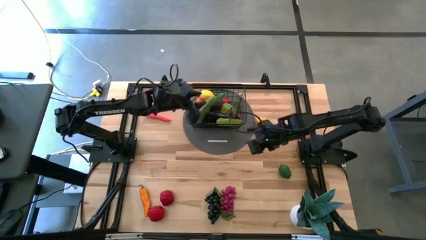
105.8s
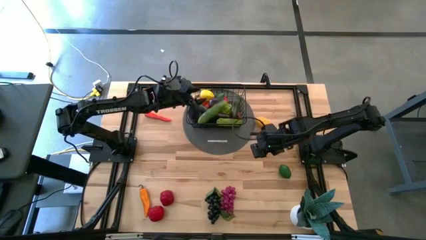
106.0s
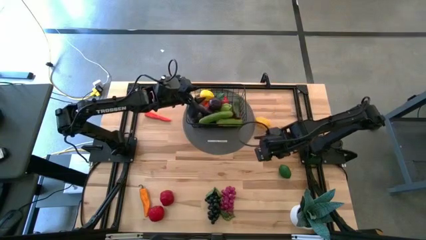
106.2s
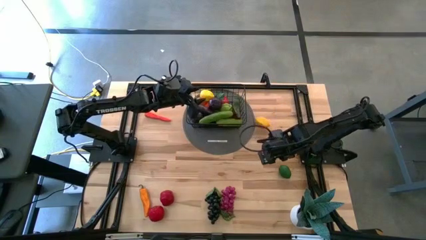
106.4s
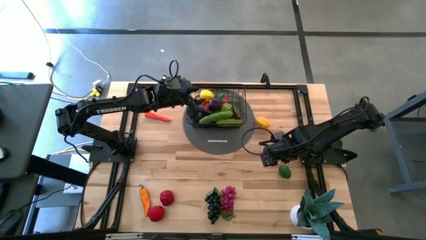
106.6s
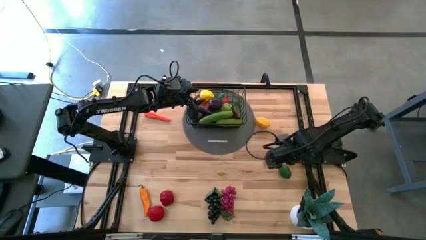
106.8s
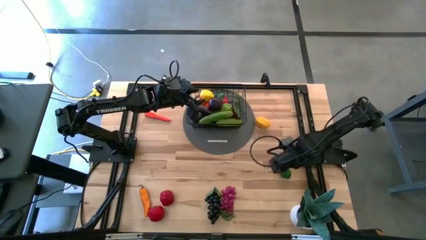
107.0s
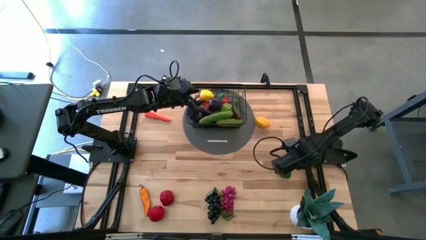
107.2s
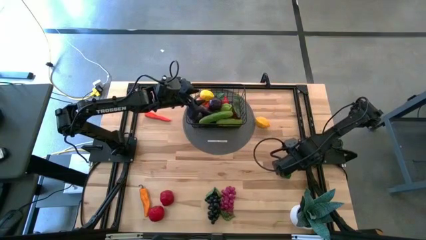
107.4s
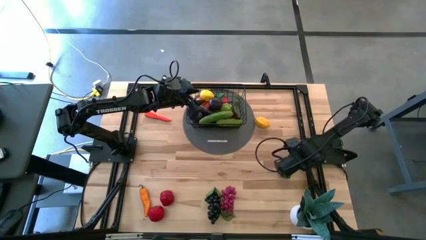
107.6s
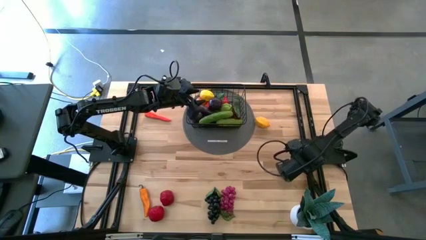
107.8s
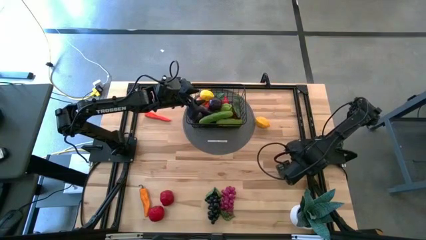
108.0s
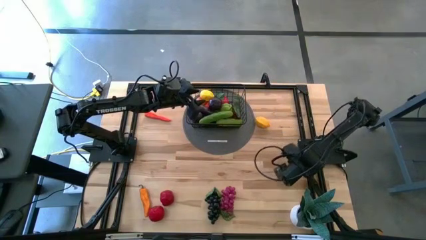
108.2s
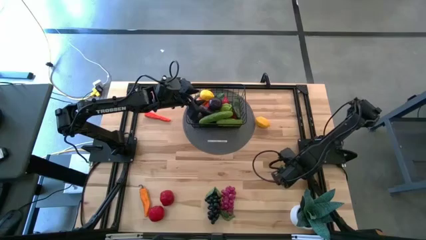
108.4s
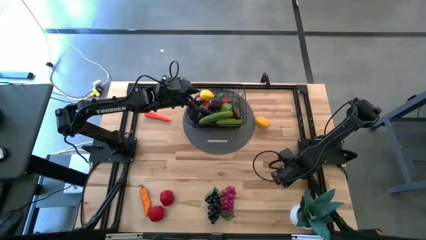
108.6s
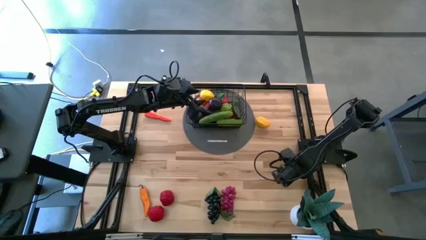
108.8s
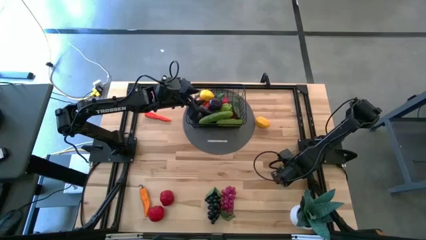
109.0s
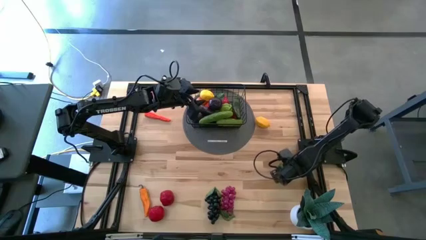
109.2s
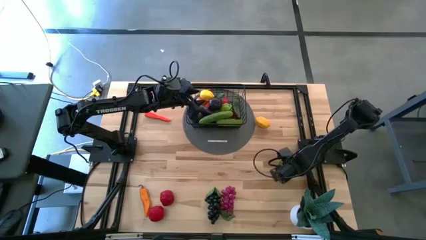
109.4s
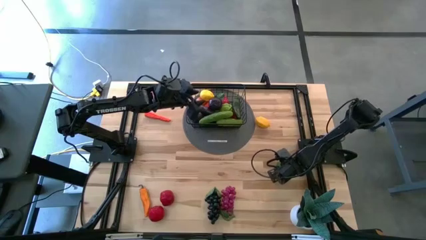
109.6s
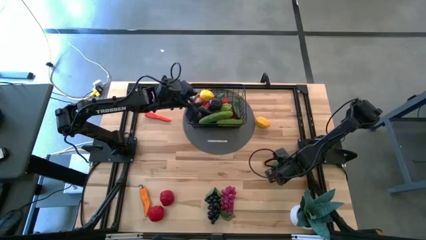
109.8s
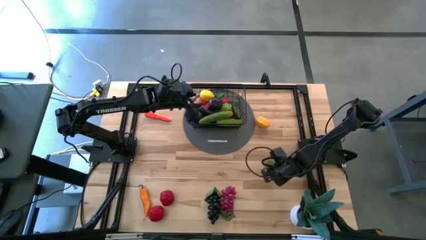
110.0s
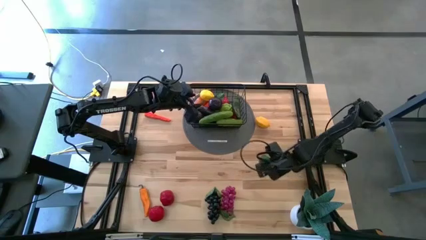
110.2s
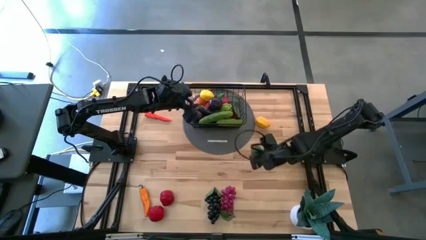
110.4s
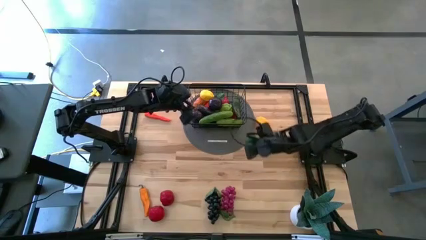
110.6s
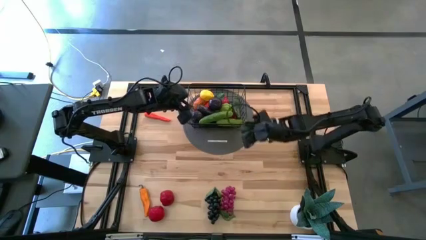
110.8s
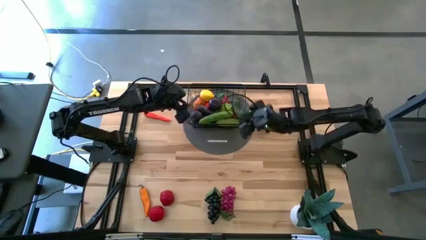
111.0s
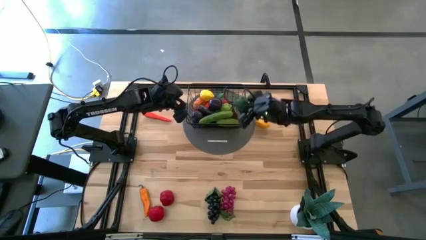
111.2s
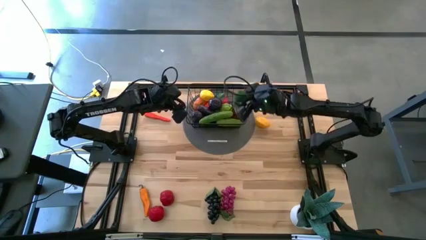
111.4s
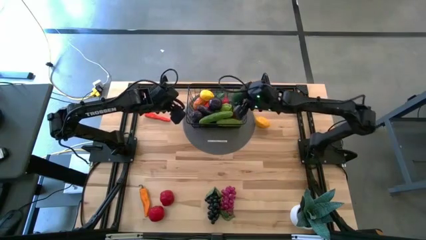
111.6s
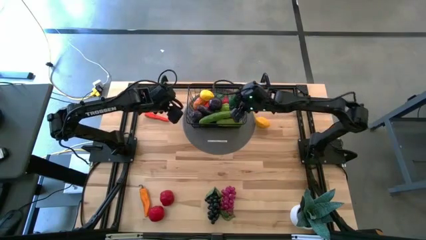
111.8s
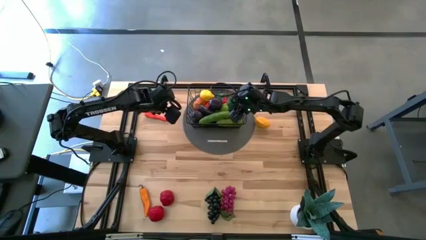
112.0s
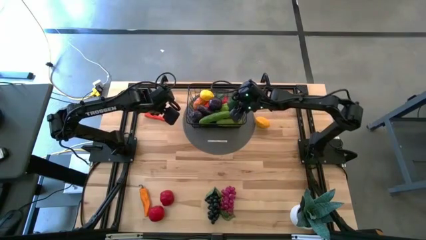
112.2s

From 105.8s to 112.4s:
Task: Build produce basket
Put the green lime into the black wire basket

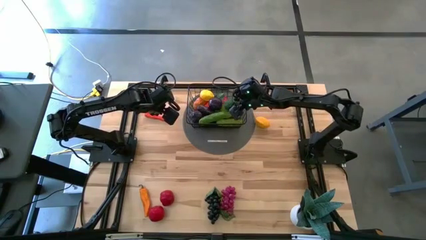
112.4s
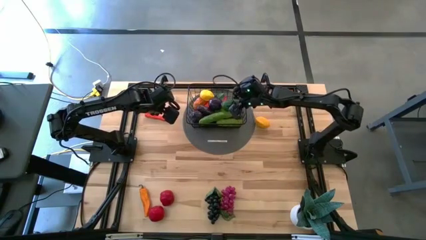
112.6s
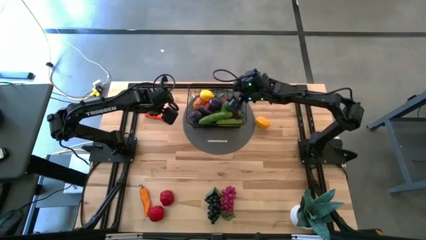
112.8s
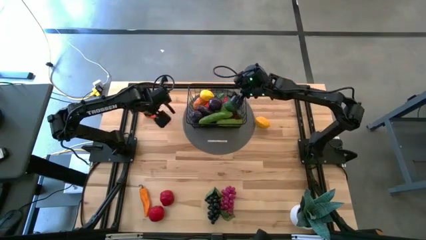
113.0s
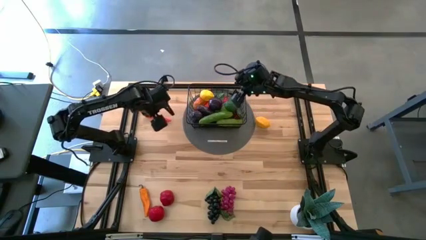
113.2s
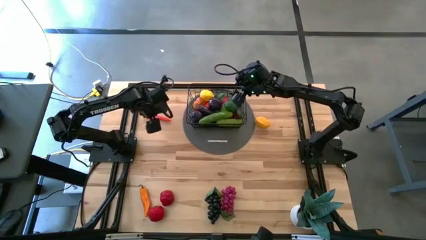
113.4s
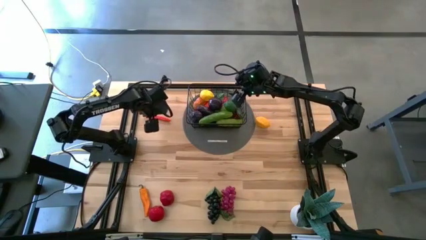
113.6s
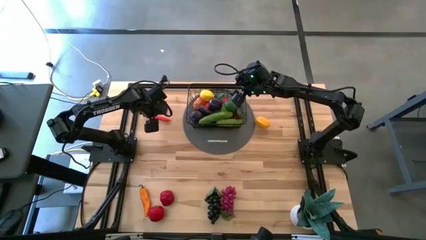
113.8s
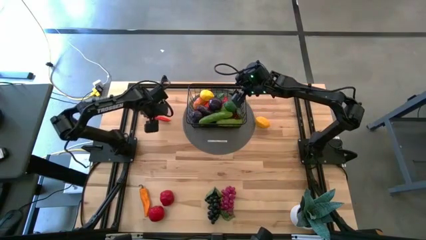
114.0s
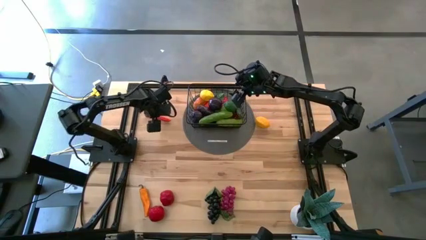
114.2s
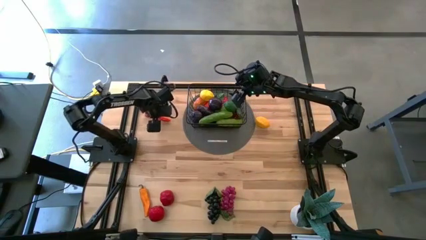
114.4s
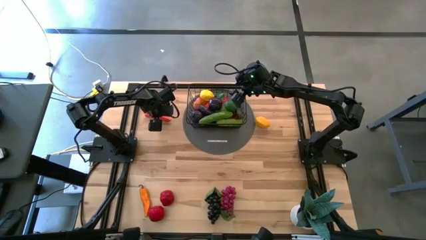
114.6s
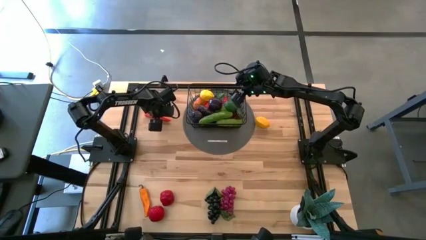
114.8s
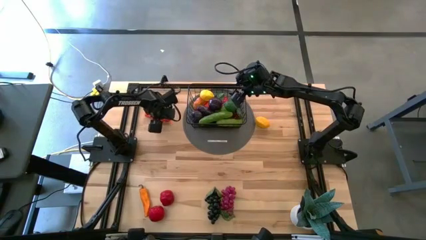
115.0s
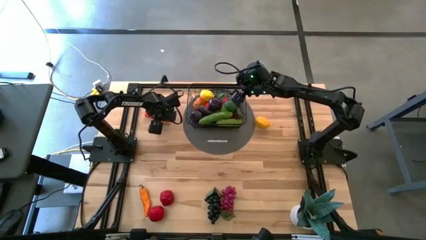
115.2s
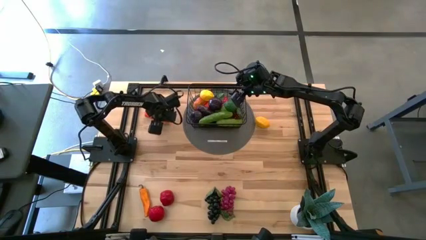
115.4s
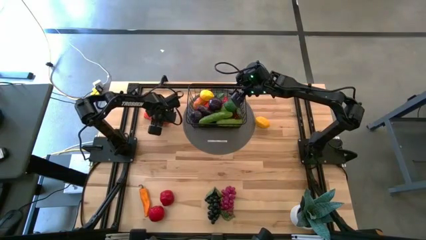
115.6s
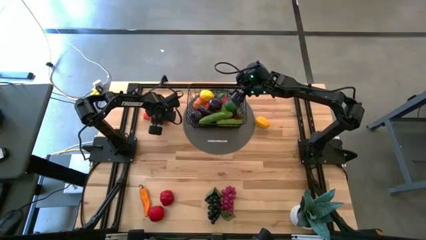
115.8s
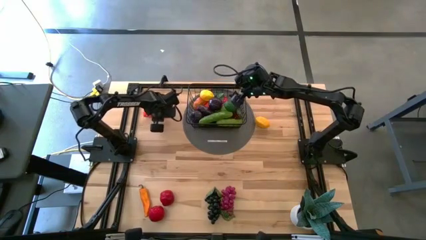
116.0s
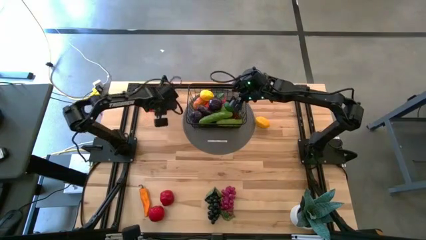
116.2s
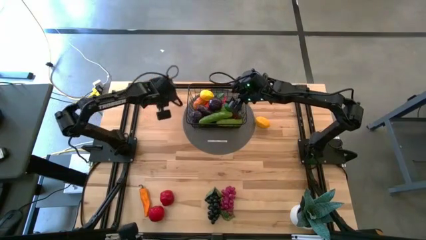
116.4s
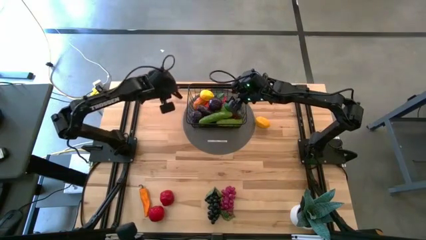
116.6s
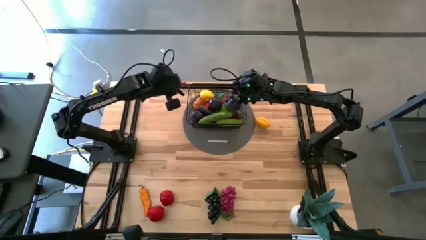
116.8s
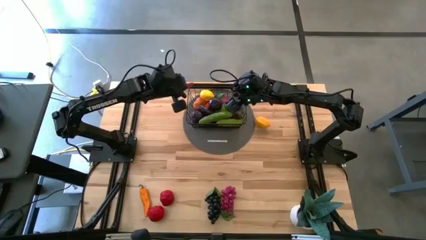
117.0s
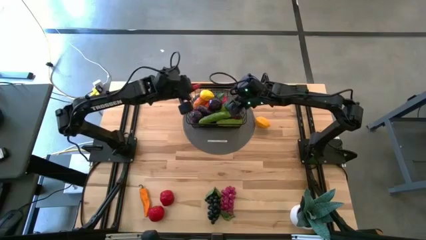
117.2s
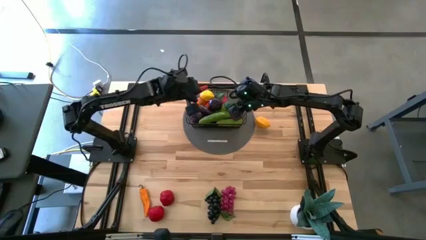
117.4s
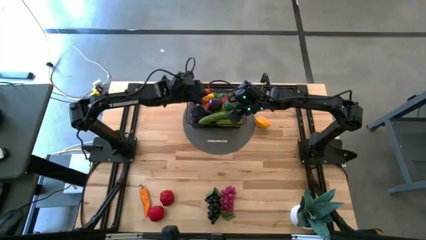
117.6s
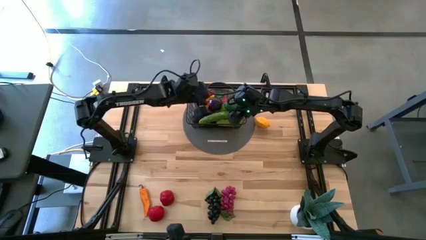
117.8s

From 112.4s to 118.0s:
Put the orange carrot into the black wire basket

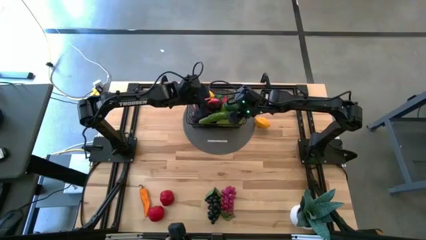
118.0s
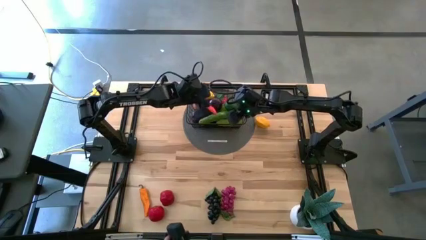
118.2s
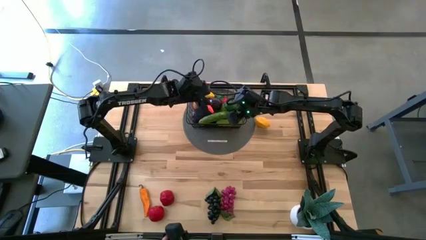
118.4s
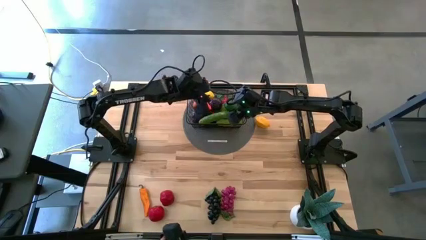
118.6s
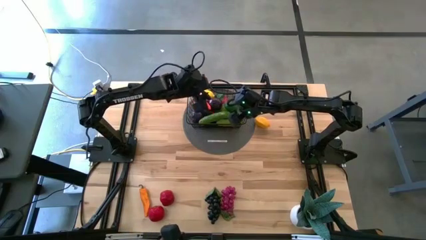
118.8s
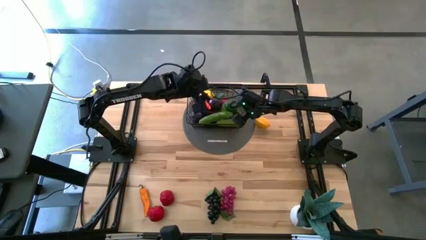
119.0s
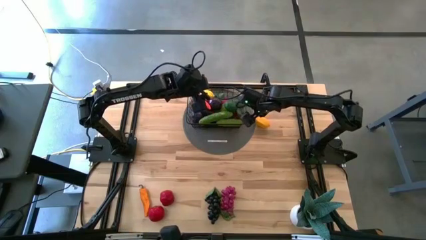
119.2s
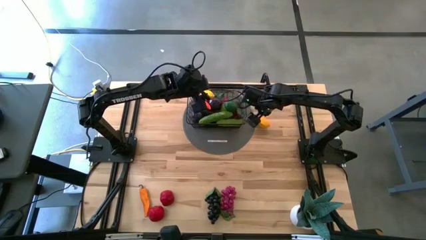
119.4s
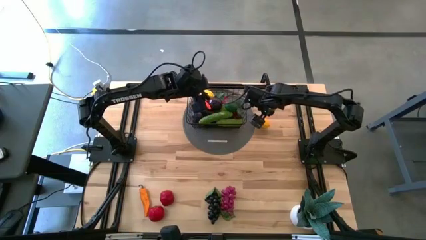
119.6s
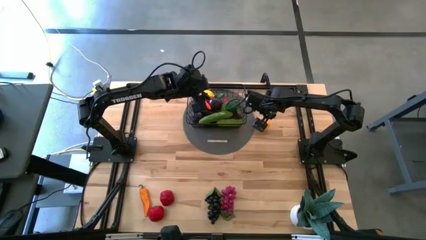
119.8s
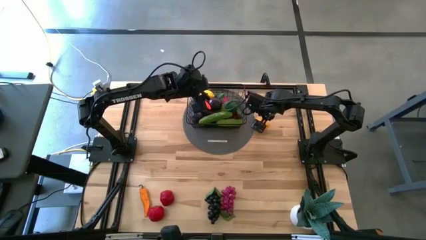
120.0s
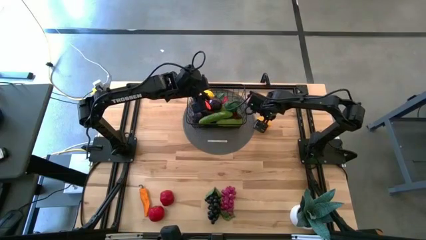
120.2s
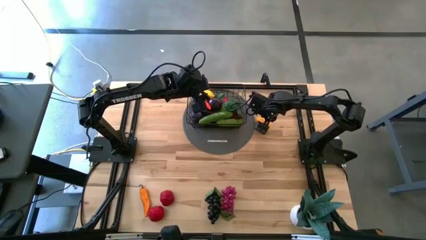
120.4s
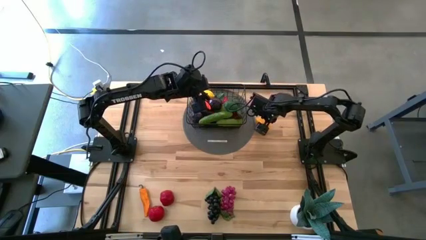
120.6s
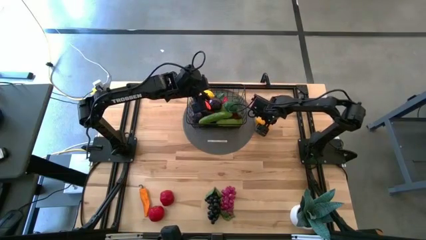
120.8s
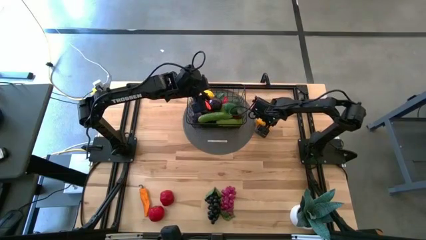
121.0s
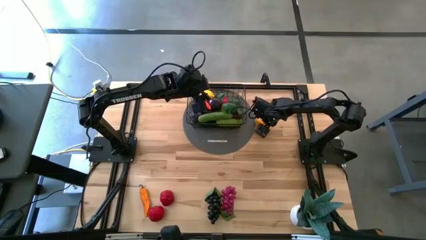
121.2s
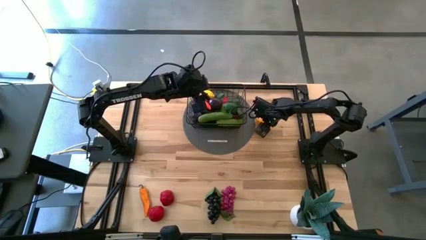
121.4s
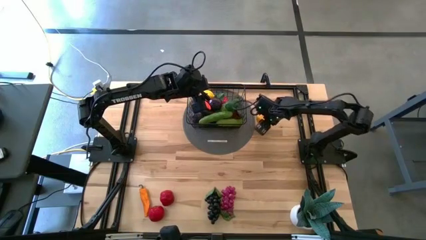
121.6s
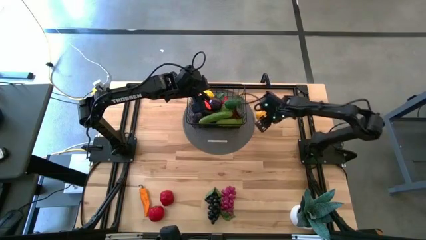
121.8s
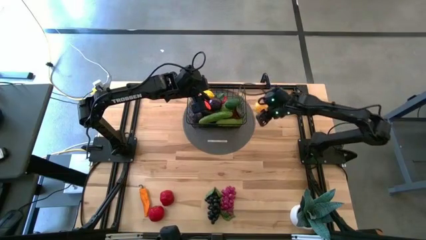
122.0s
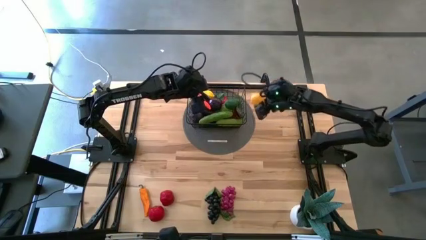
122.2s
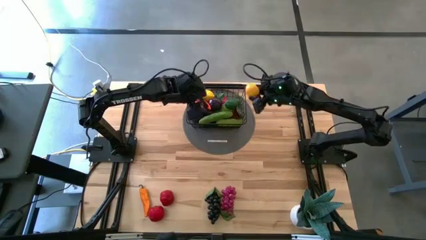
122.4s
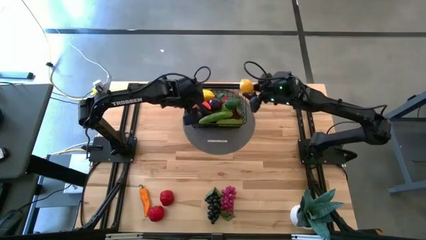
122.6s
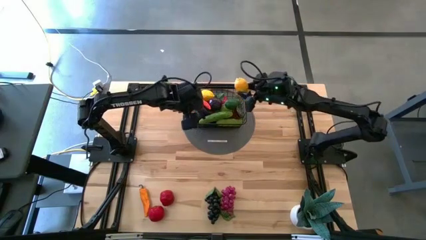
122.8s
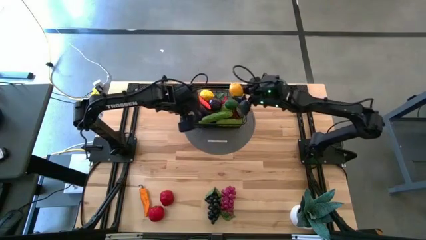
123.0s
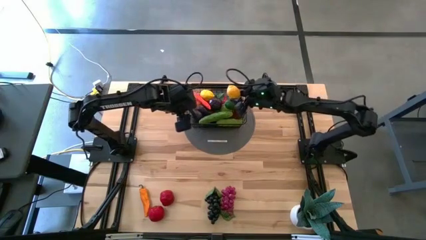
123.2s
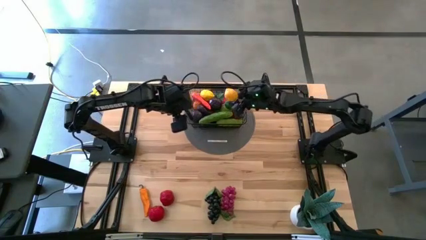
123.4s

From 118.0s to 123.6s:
Put the yellow lemon into the black wire basket
